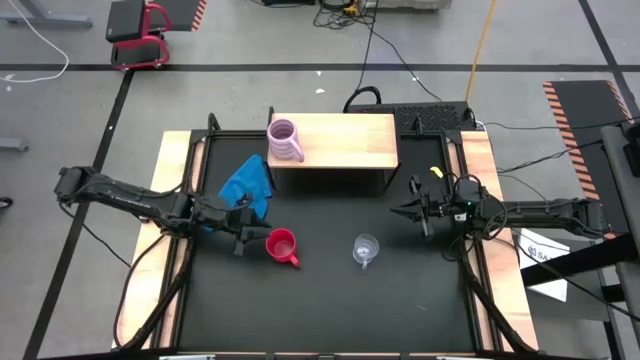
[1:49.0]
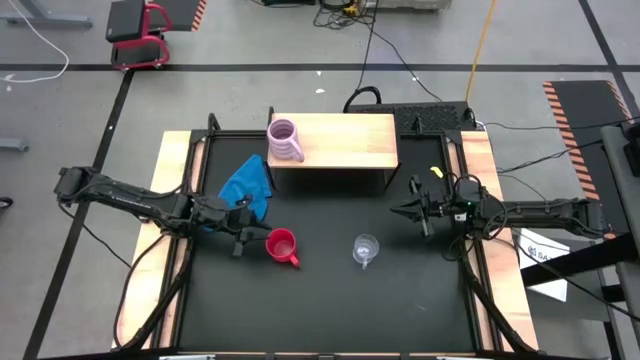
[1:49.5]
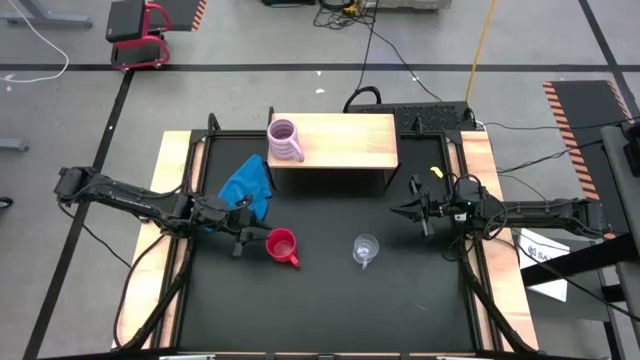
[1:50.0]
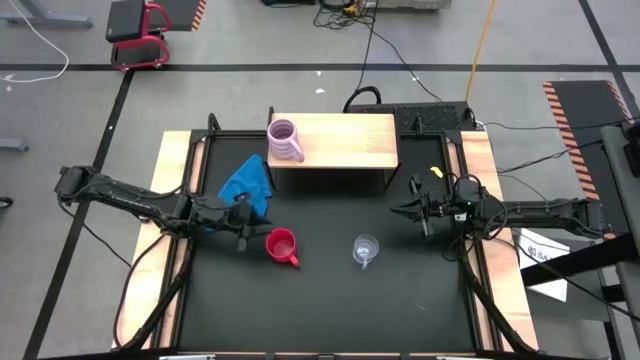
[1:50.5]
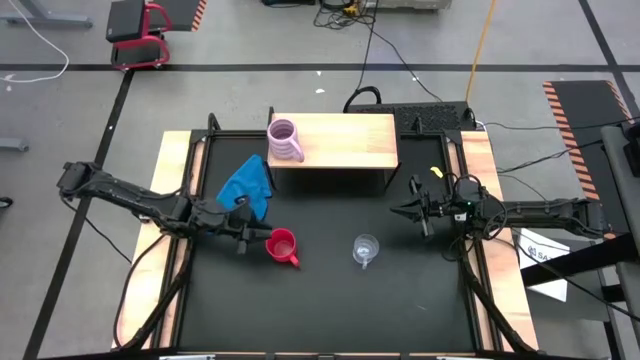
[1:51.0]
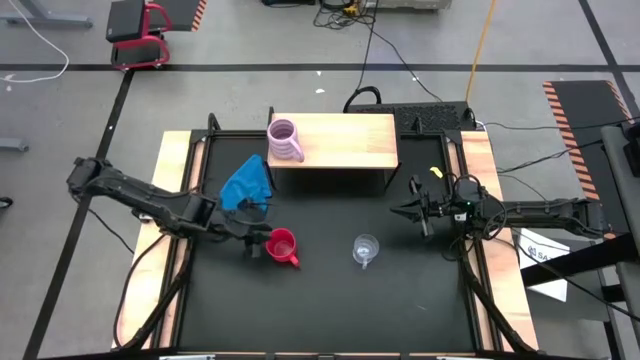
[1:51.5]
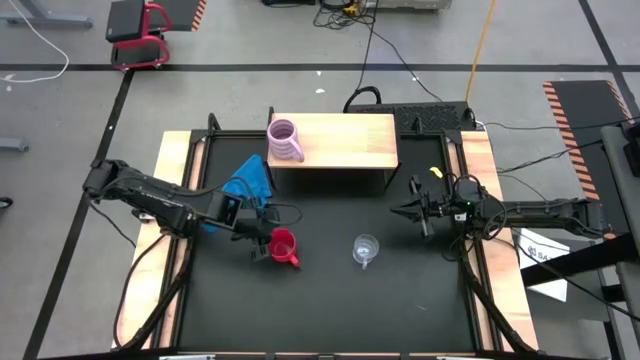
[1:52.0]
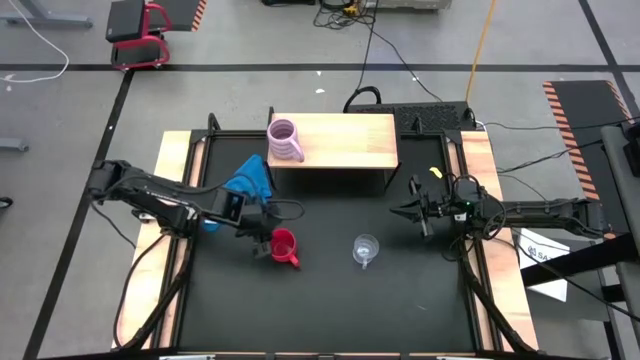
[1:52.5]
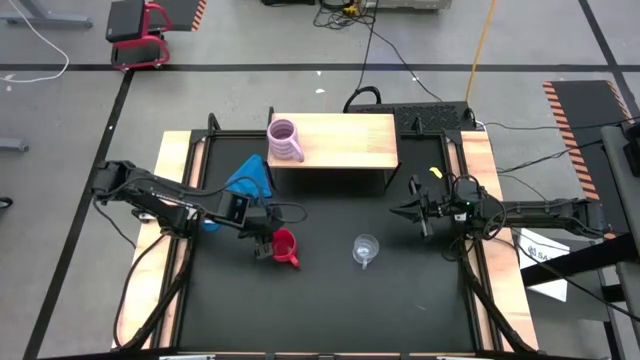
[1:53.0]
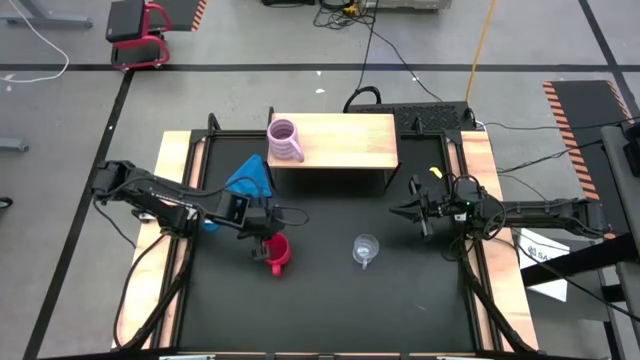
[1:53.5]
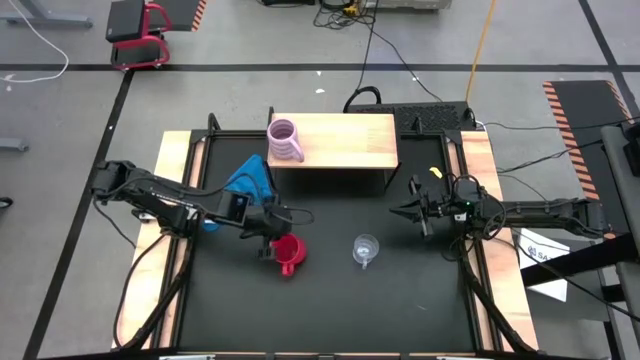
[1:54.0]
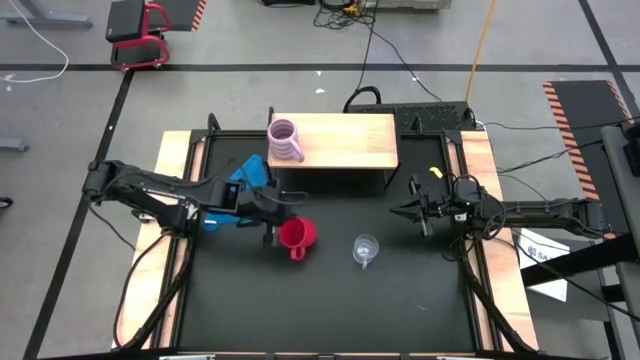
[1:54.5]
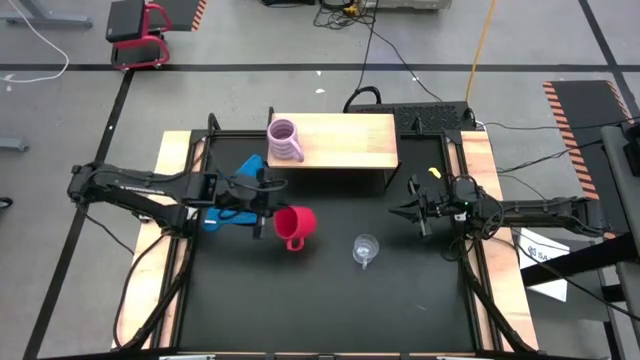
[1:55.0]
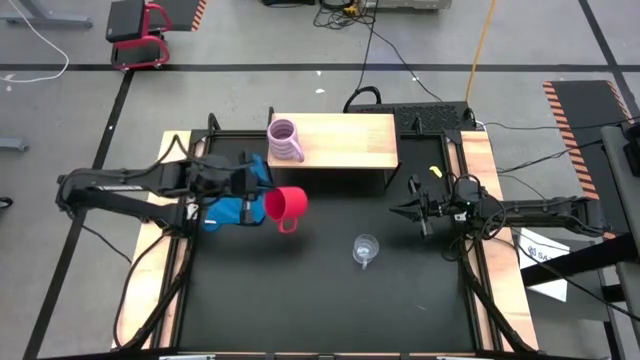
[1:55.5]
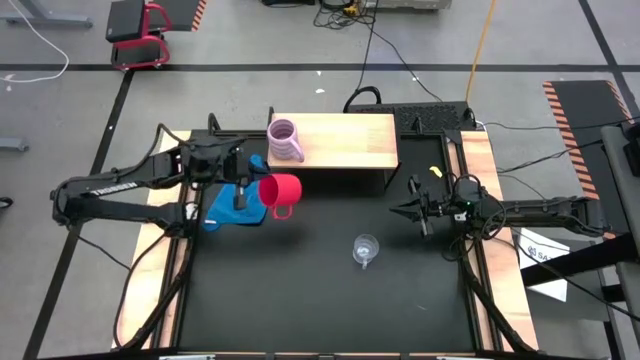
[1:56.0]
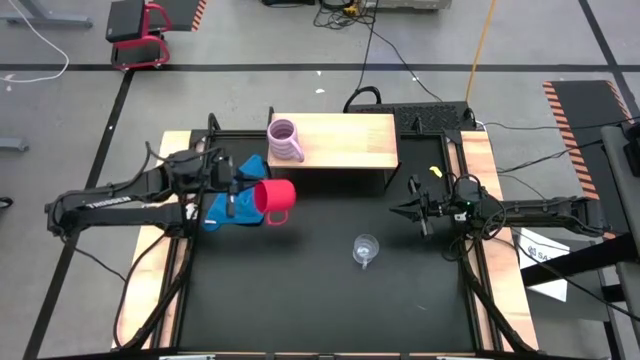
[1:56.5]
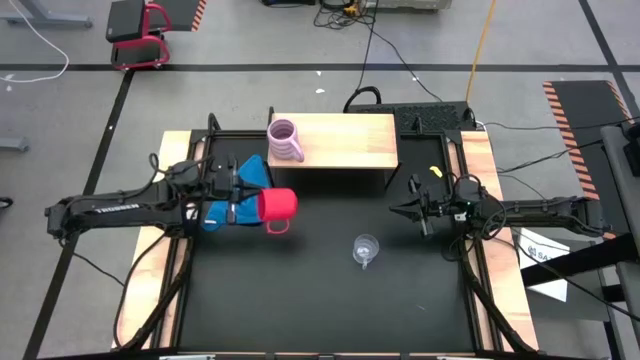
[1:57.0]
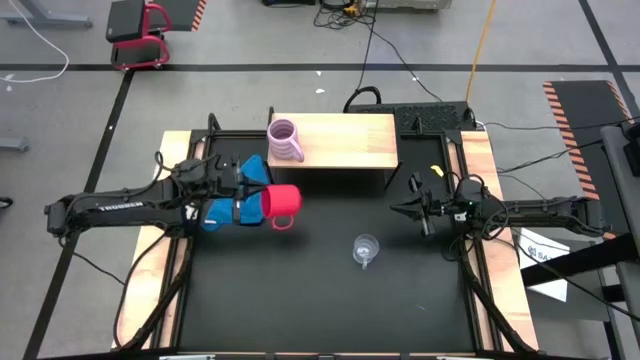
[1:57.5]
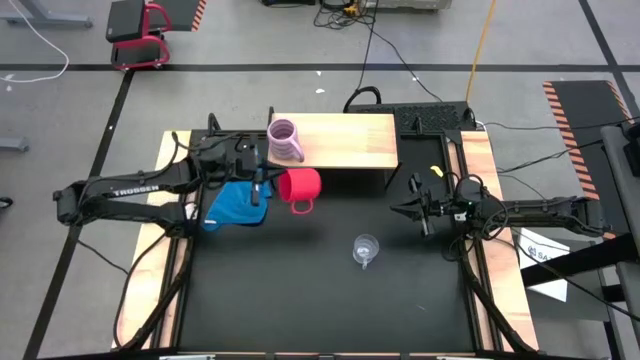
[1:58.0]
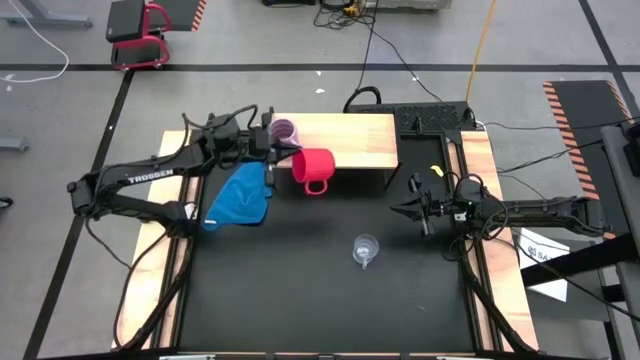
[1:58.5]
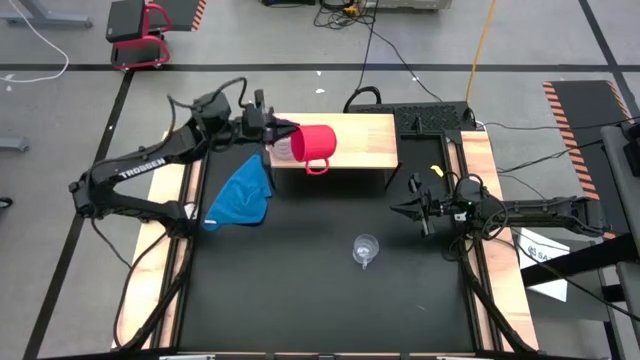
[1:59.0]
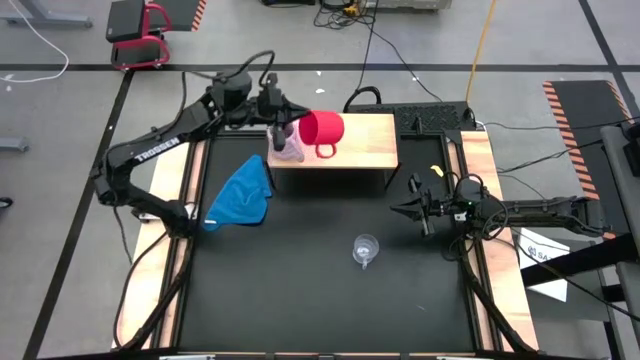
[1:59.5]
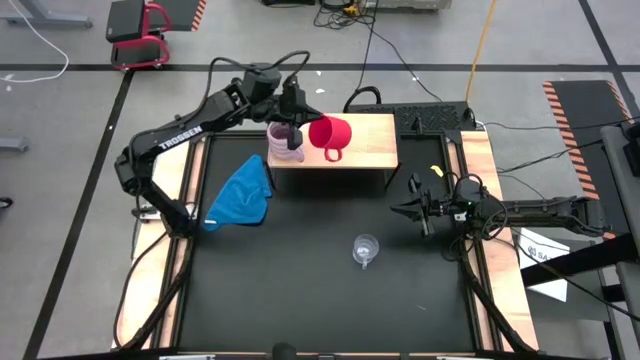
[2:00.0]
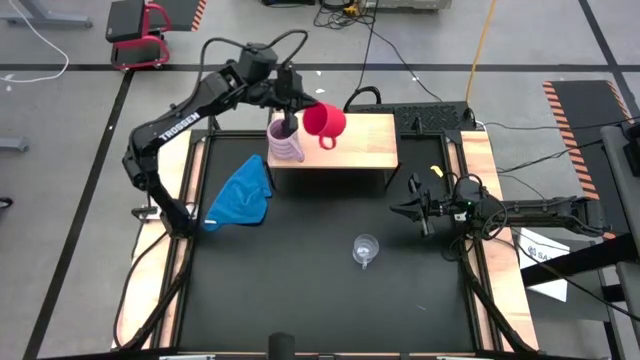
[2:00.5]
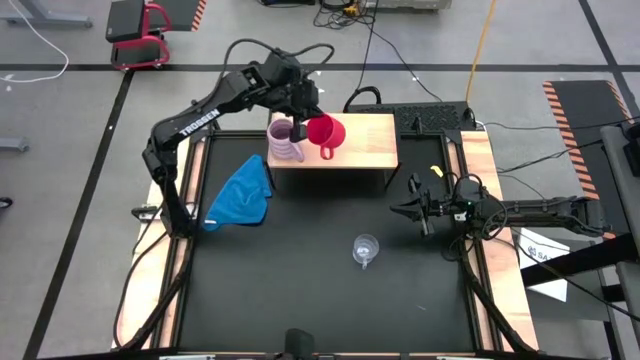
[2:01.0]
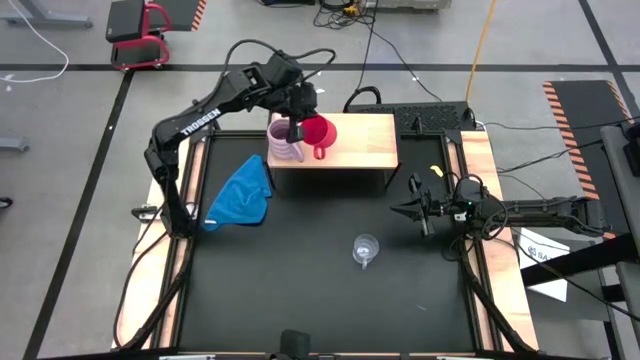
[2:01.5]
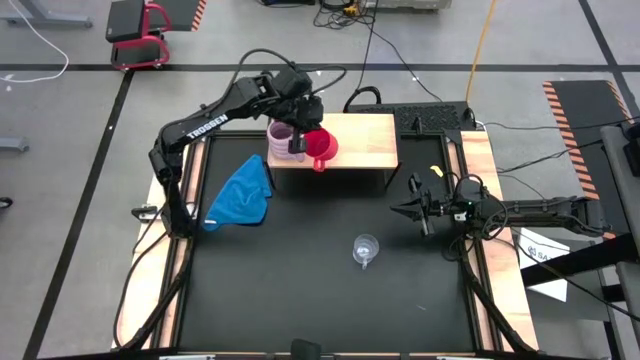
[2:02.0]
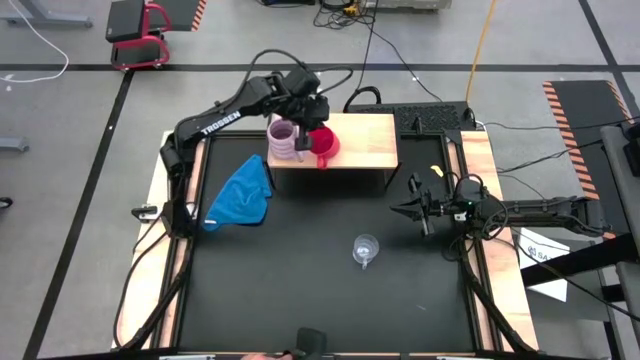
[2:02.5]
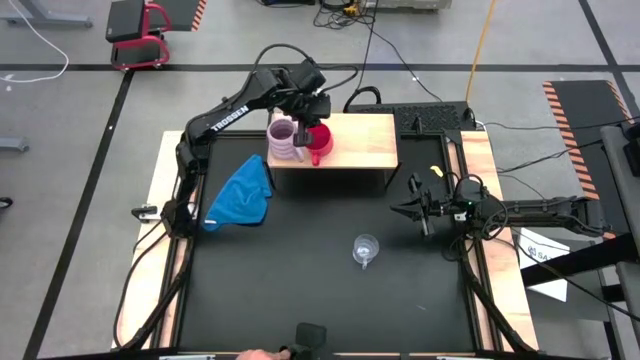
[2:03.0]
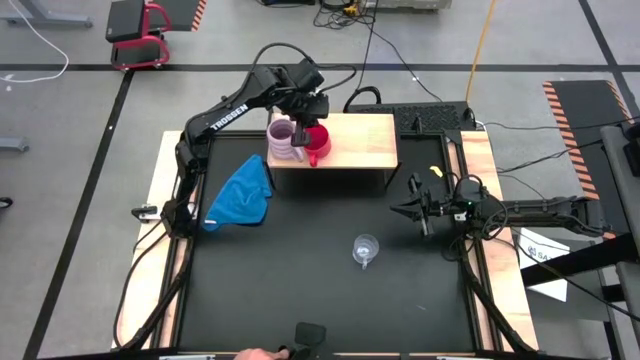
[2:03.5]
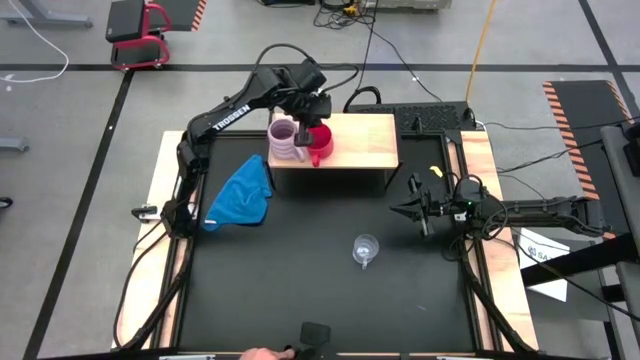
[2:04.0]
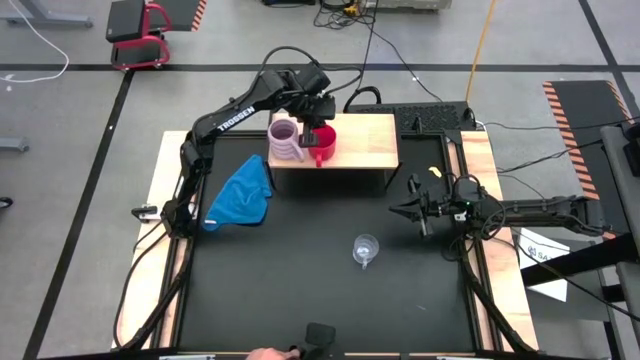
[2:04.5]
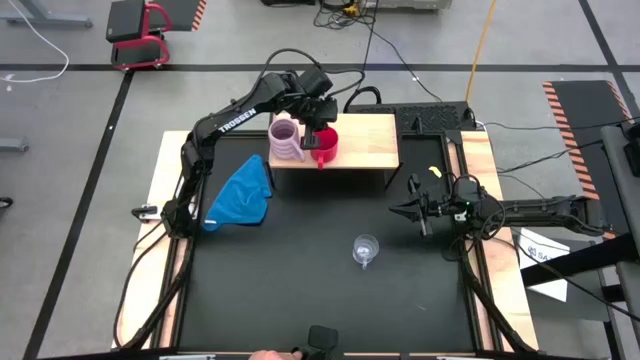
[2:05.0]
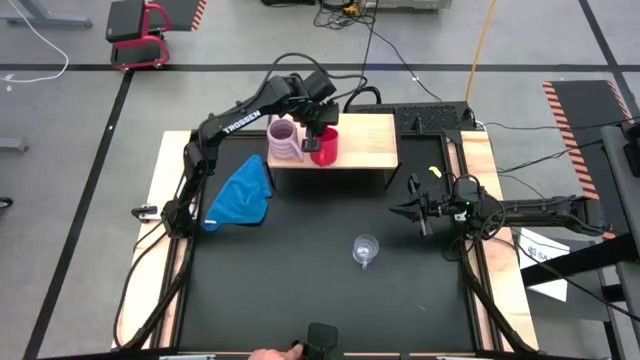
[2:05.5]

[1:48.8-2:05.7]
Task: Stack small to large cups/mugs on shelf
Put the red mug on the shelf

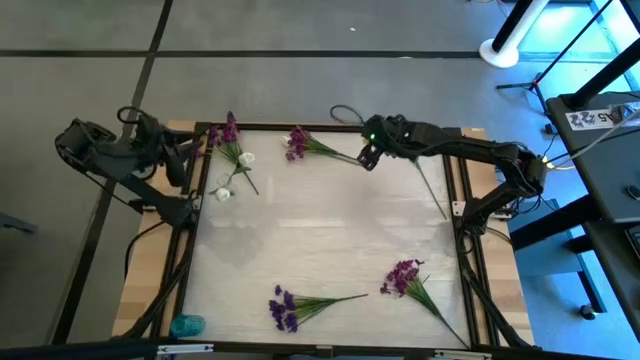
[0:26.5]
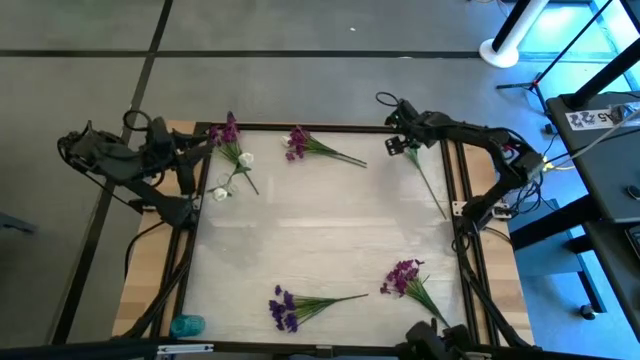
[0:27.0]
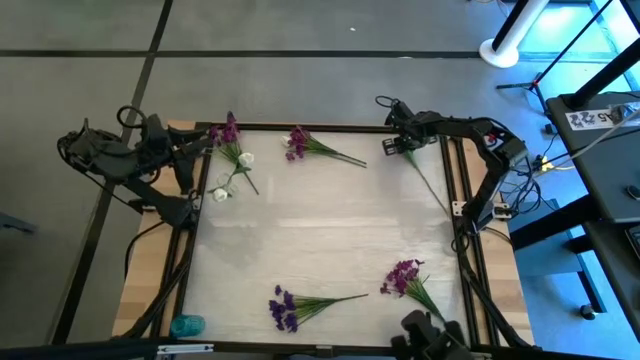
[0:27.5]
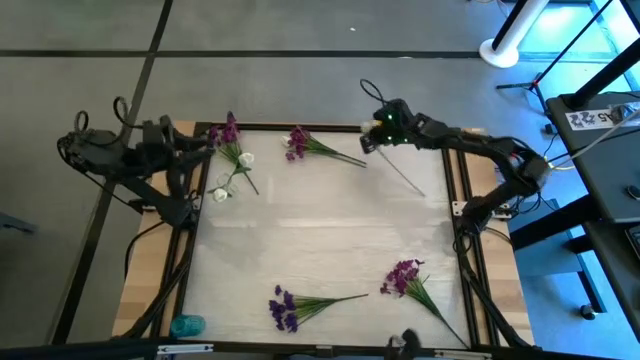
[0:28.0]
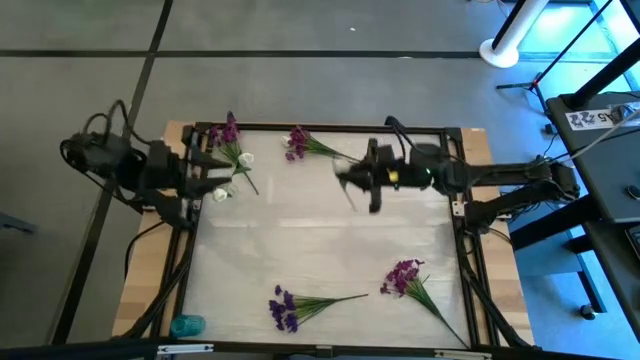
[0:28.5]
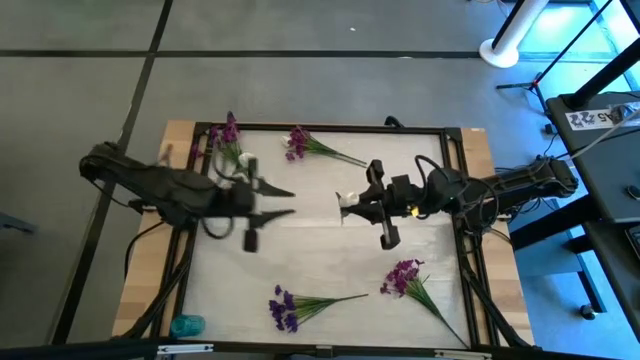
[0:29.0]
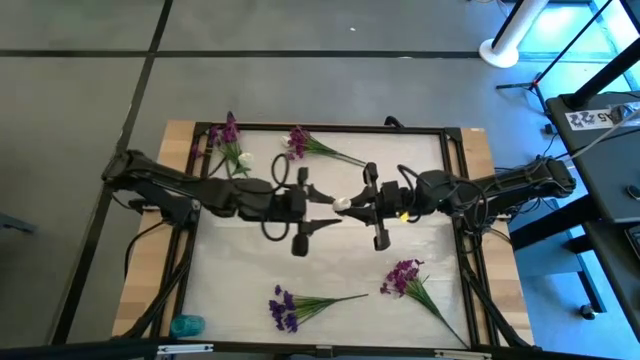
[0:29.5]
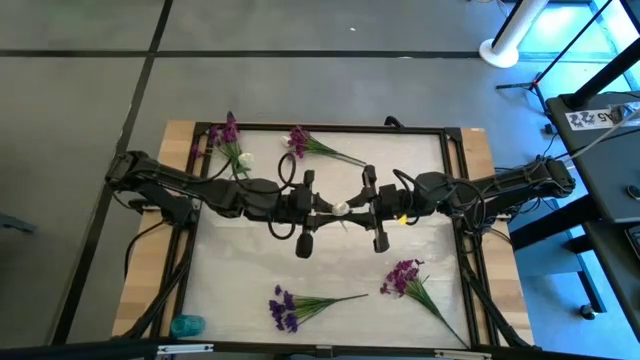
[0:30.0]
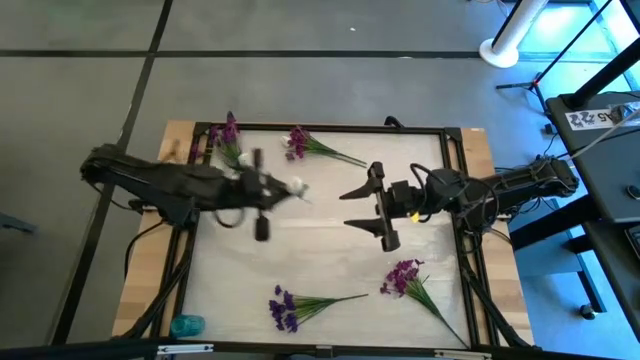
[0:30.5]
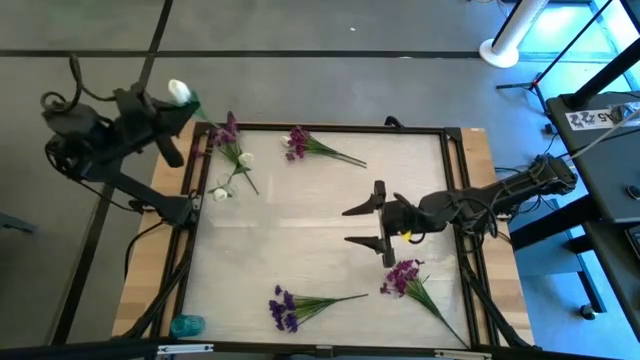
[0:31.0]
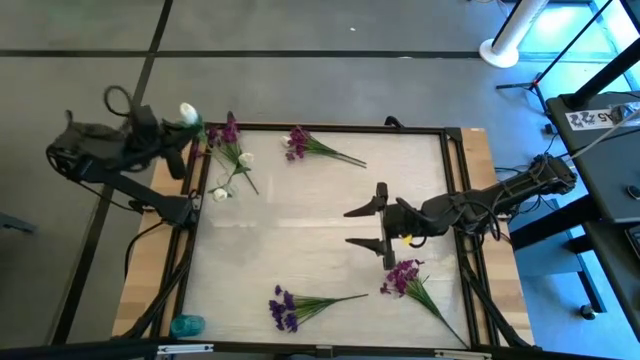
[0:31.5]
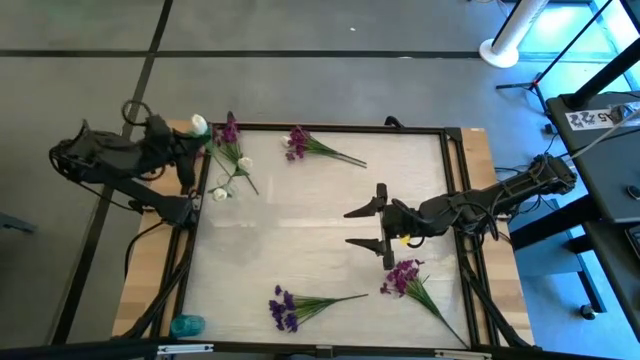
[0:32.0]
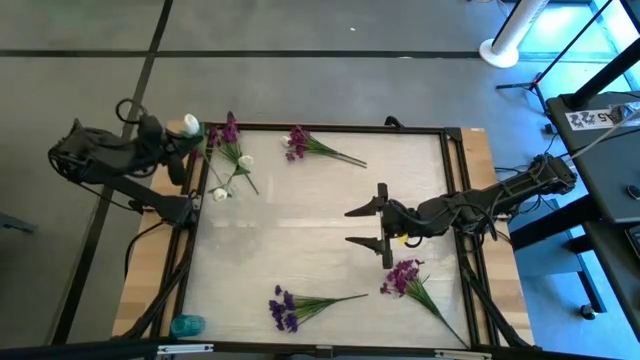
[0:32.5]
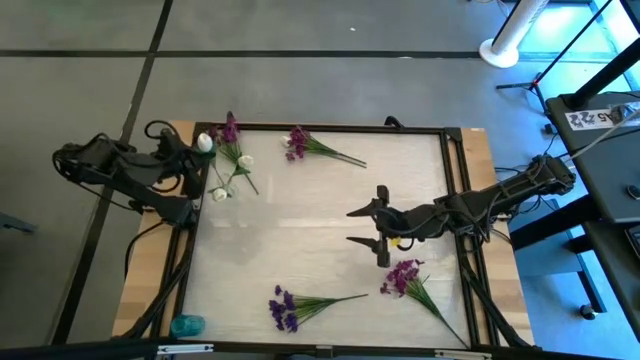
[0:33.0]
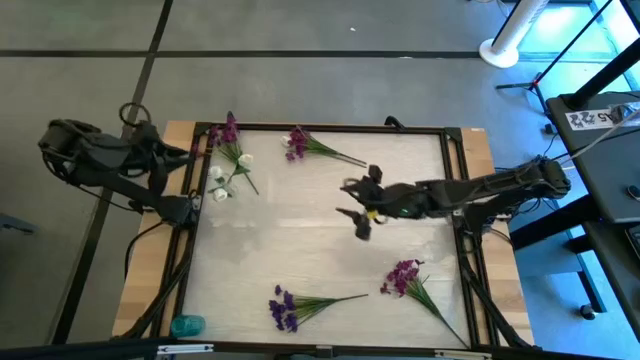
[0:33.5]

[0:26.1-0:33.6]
Task: Sort flowers into vase by color
Put the white flower into the transparent vase
